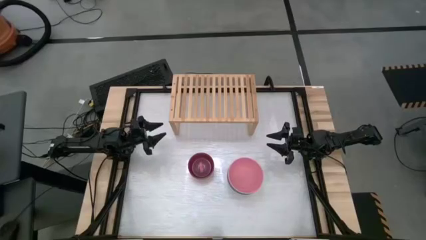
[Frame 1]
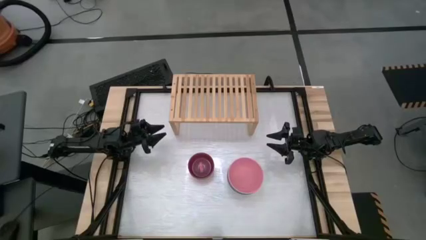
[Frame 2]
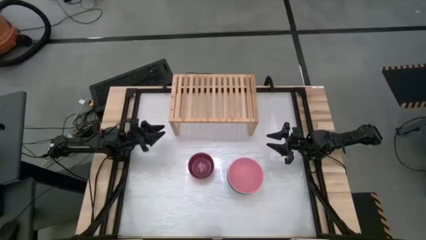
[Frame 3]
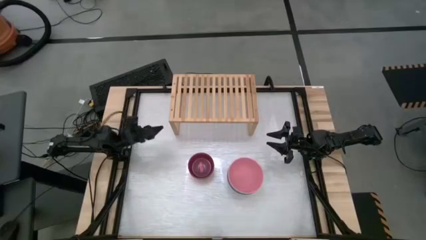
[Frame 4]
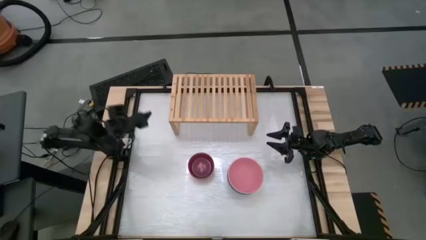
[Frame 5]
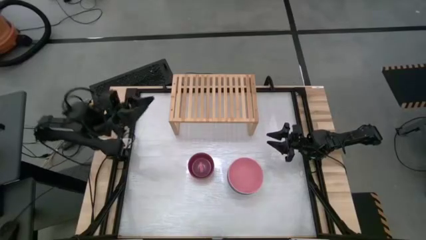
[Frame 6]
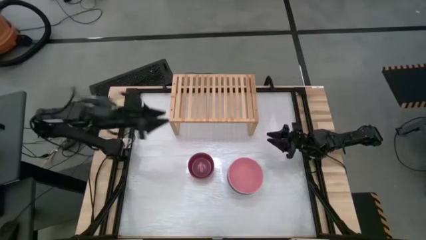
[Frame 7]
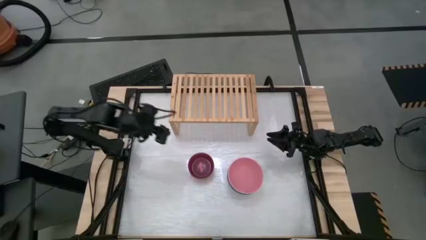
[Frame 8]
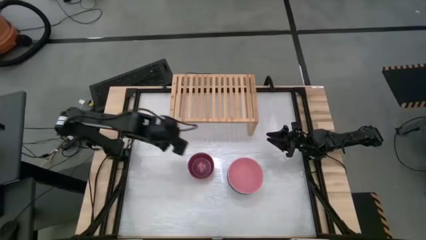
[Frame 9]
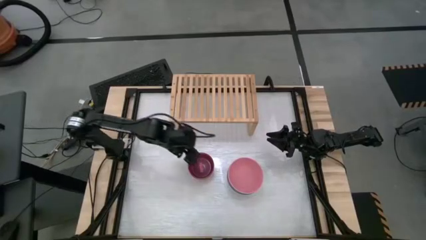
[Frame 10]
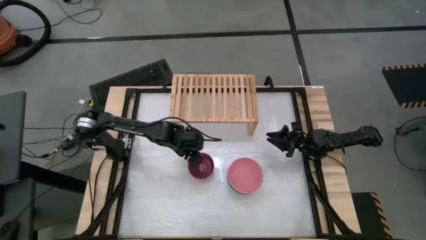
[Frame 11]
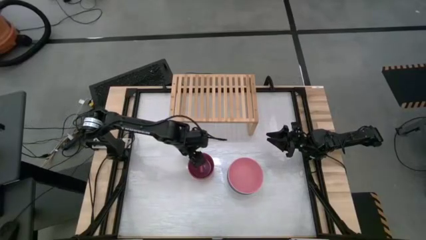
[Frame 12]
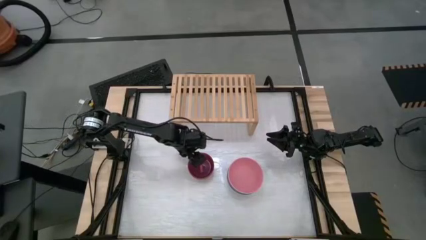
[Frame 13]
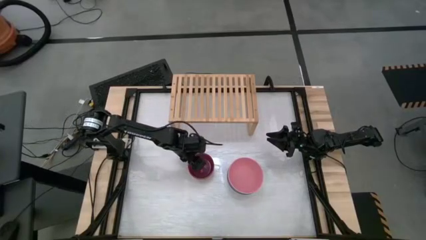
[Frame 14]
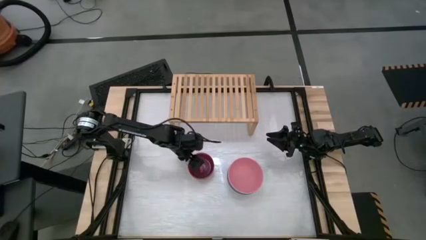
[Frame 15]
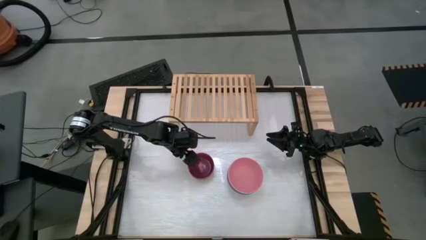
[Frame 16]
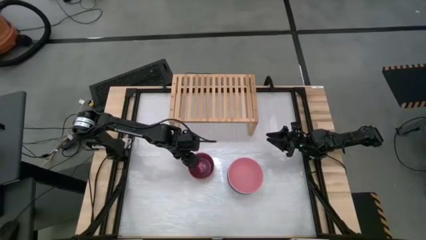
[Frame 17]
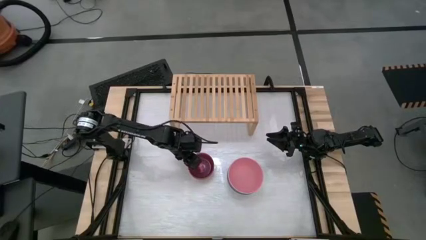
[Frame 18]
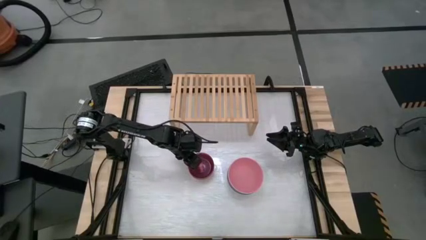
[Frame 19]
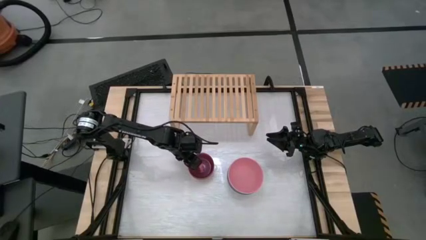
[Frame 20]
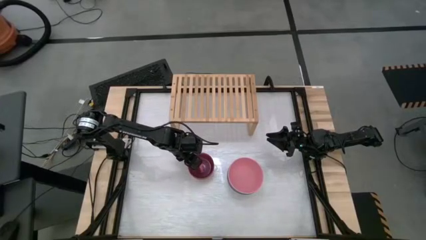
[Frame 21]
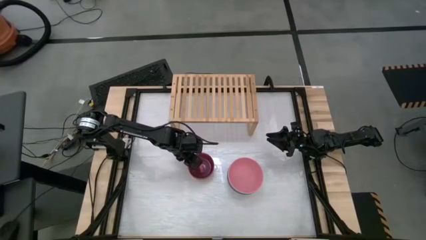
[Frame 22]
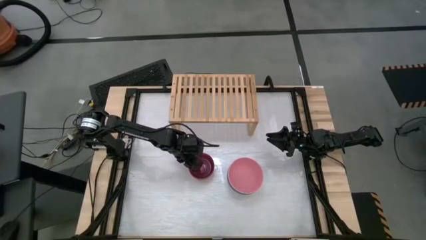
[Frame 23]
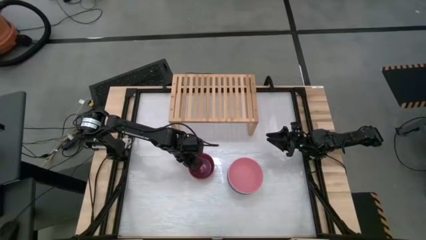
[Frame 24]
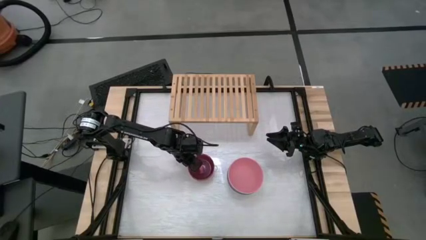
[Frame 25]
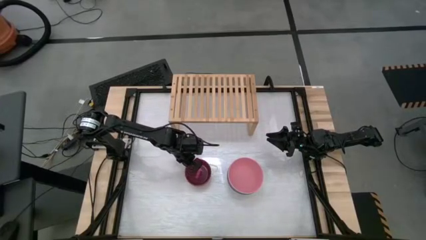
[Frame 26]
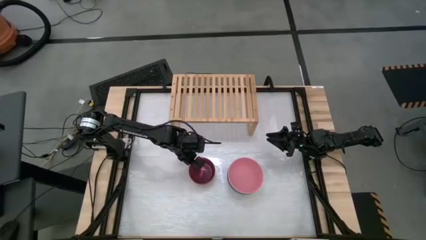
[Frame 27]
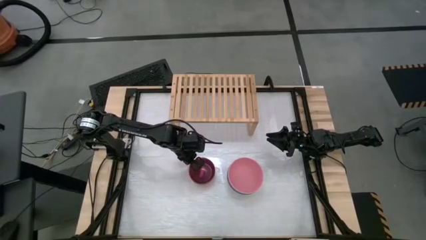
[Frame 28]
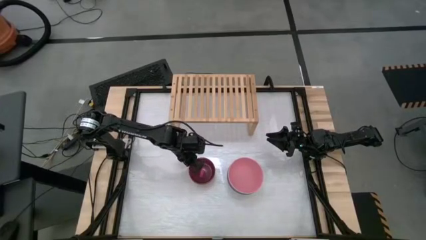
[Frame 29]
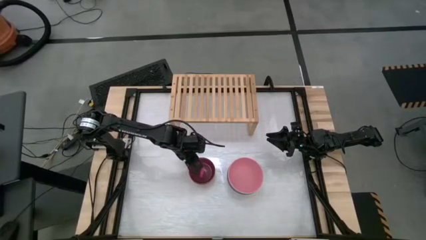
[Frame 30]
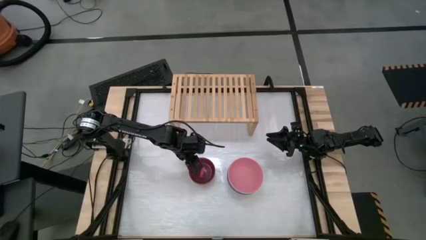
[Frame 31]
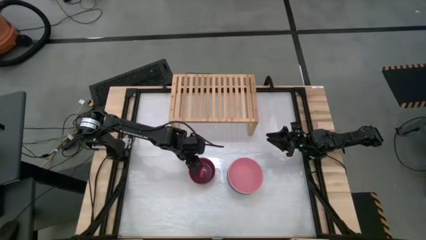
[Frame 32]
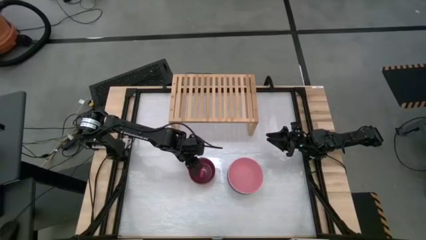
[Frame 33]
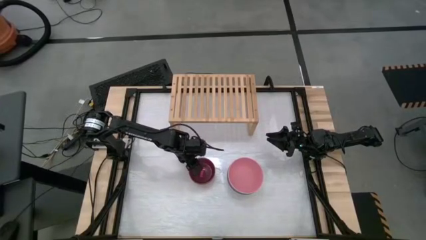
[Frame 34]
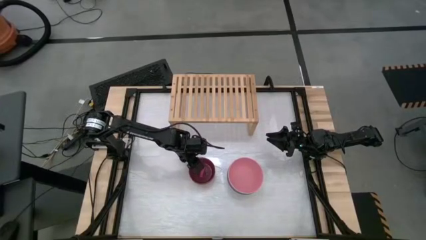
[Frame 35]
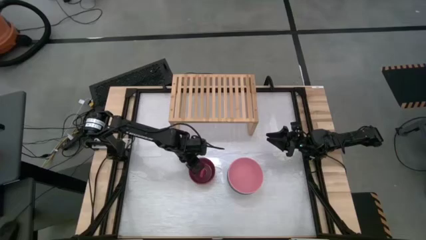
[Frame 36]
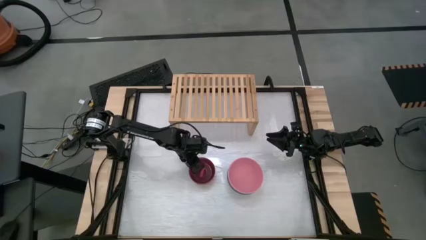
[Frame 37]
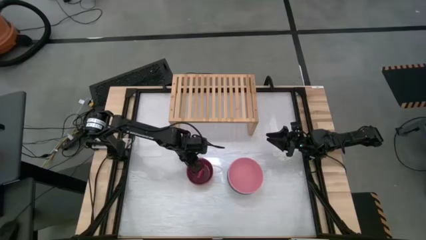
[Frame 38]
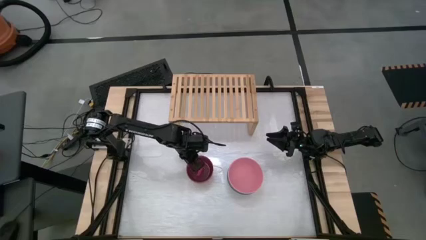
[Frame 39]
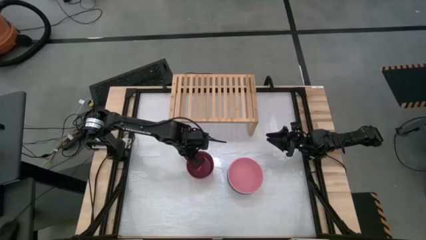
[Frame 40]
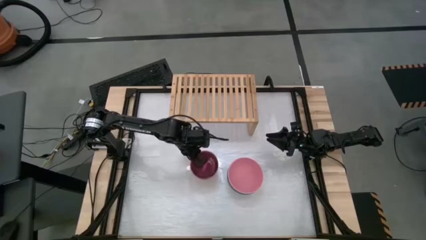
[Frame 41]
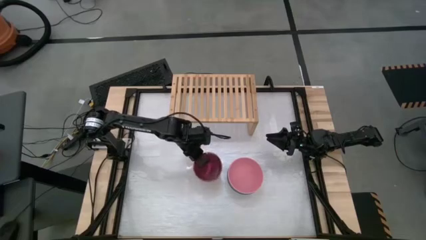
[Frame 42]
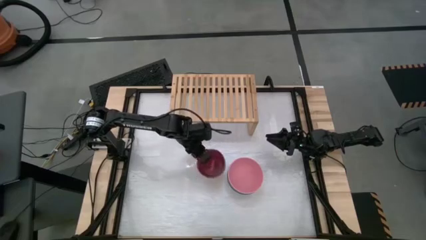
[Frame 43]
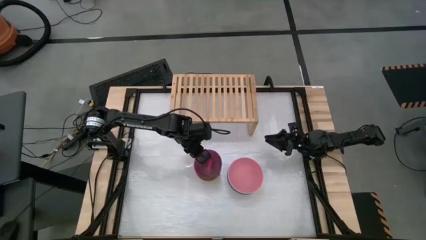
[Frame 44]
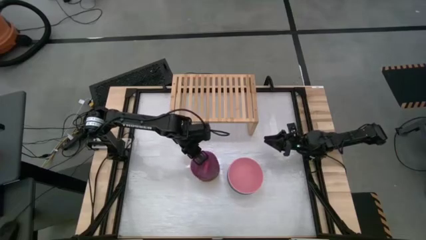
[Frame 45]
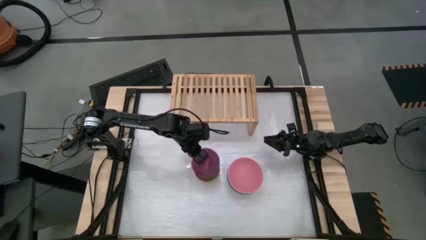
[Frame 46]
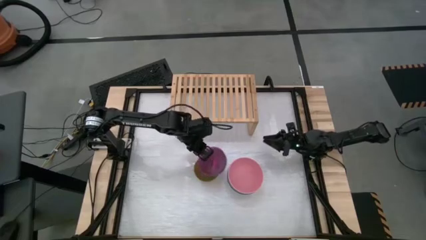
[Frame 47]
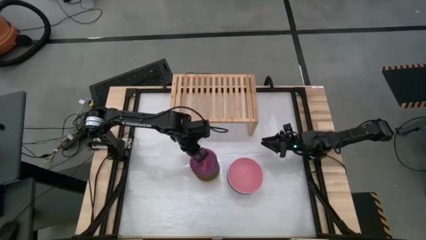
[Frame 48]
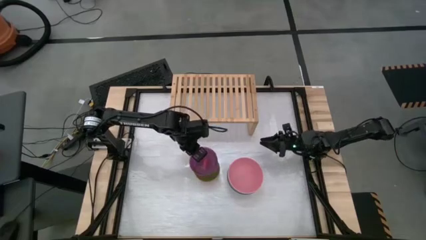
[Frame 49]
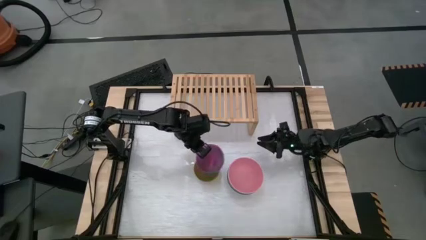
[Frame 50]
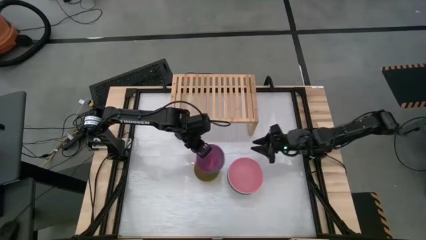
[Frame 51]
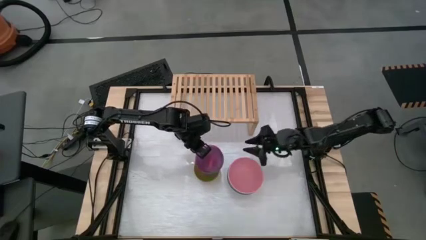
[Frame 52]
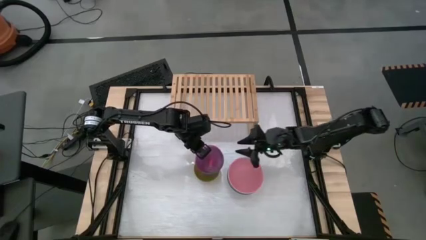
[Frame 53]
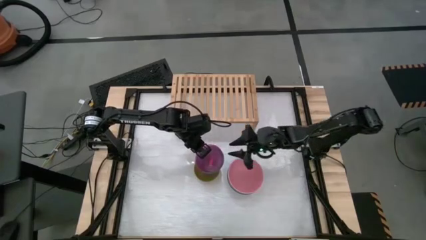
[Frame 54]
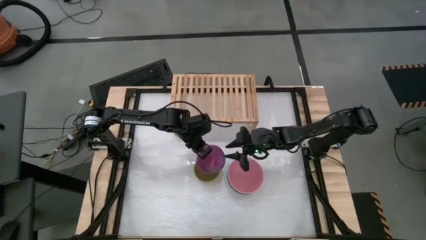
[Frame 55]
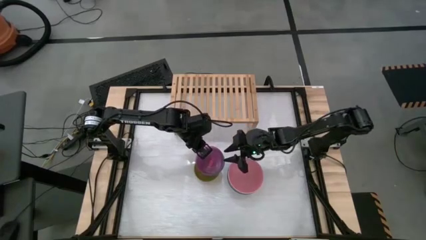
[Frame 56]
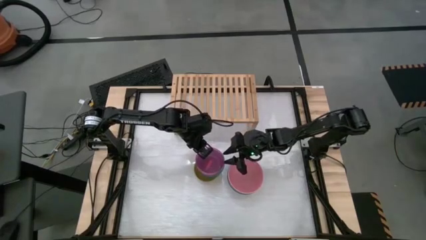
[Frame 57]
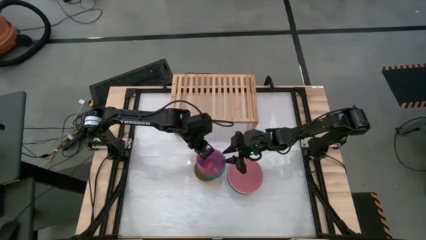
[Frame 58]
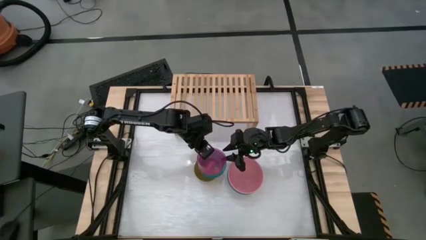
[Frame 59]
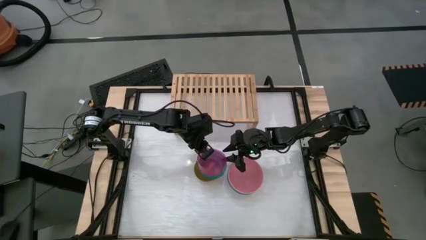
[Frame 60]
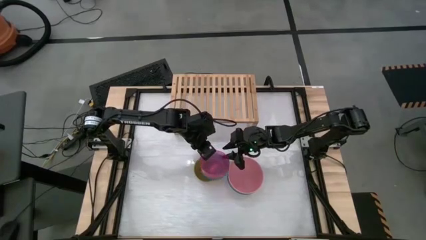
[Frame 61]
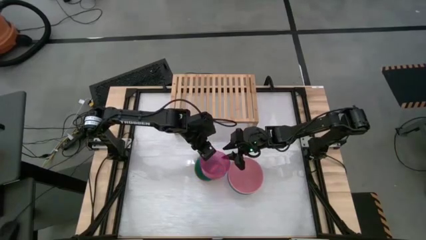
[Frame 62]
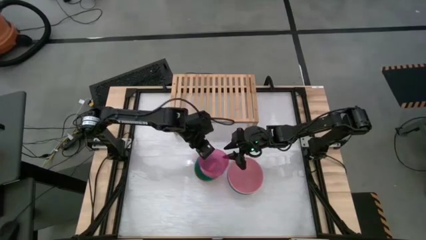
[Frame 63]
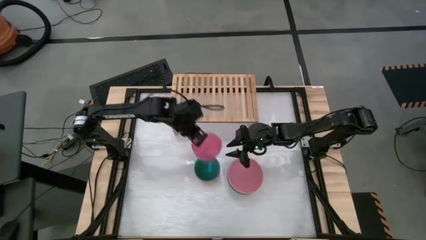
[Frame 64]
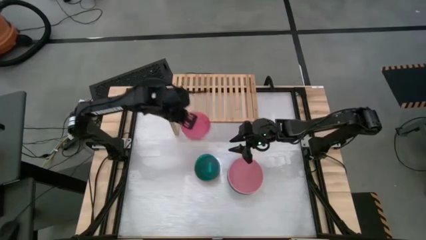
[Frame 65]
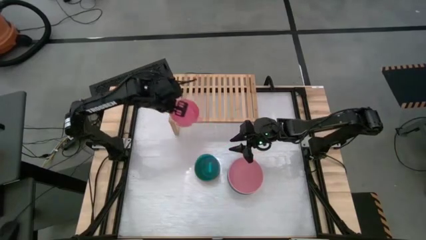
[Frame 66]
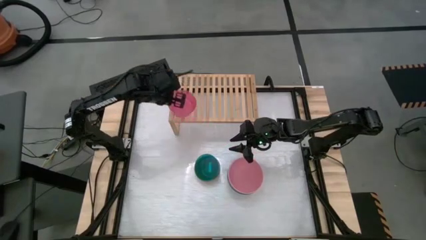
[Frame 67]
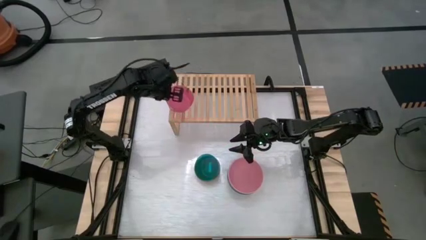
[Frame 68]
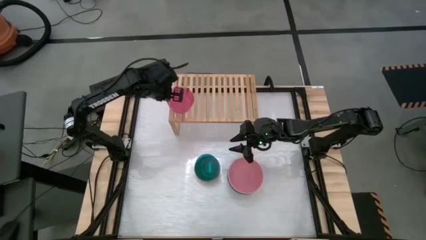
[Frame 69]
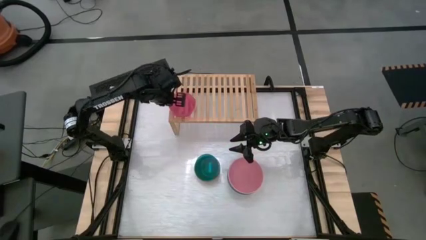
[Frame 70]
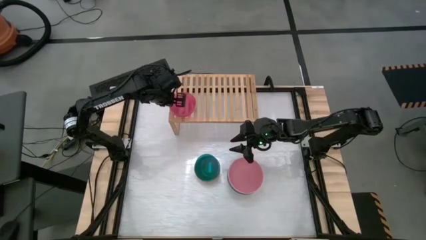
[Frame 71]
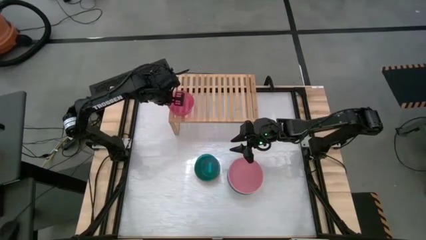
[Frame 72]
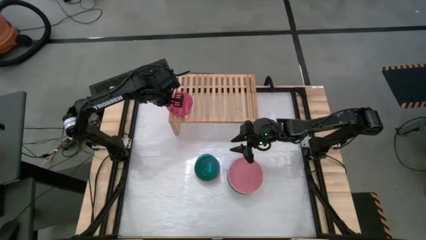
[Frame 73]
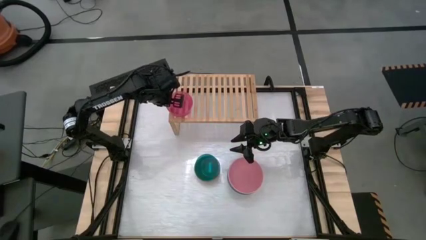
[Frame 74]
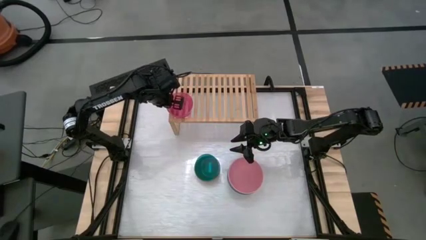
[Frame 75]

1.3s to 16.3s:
Task: Place and stack bowls onto a shelf
Put the pink bowl on the shelf
